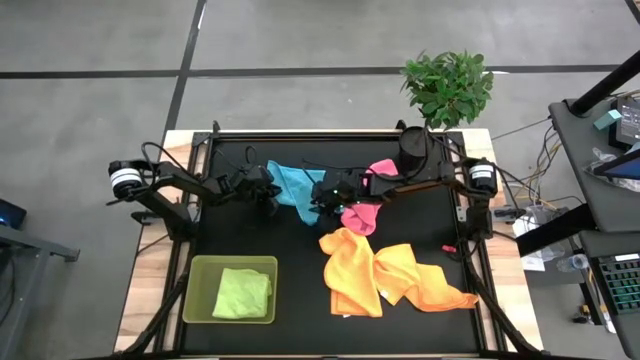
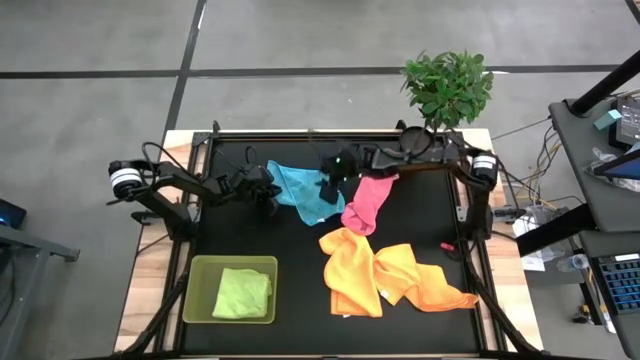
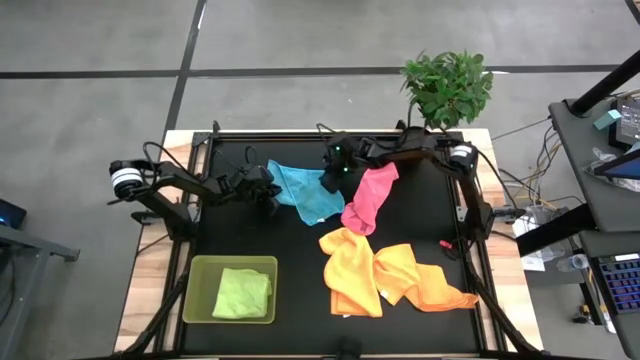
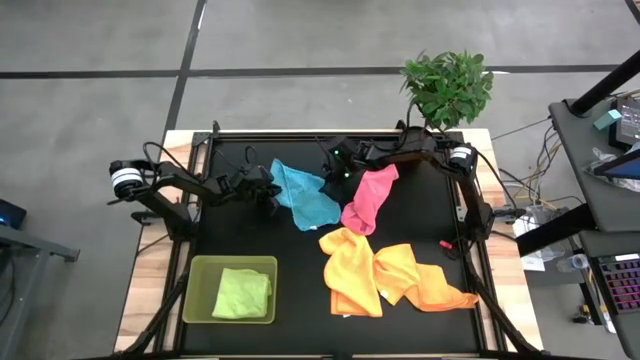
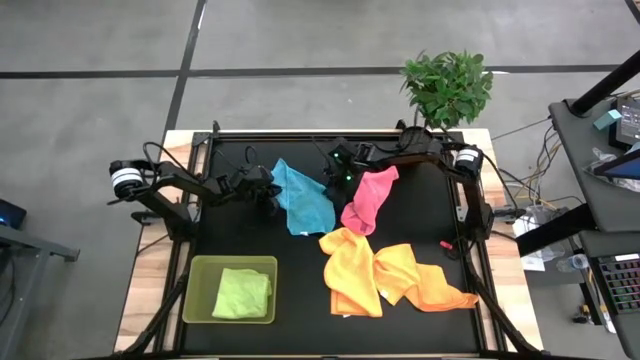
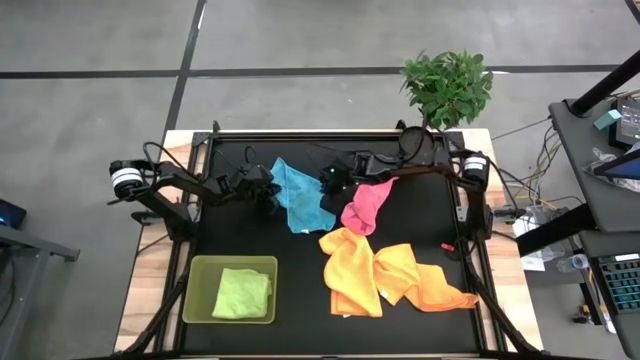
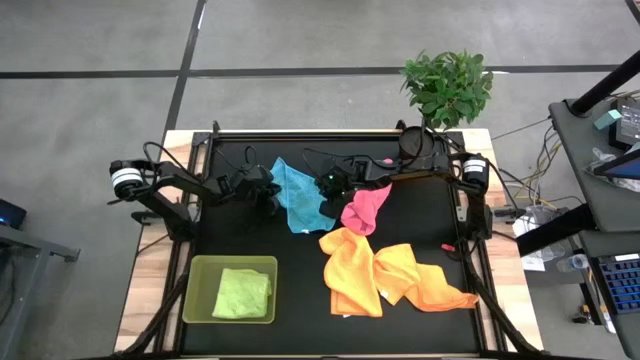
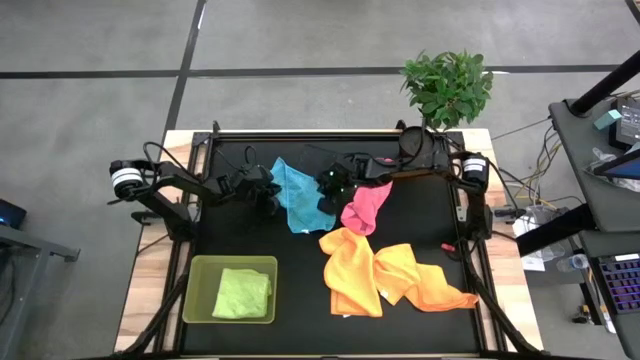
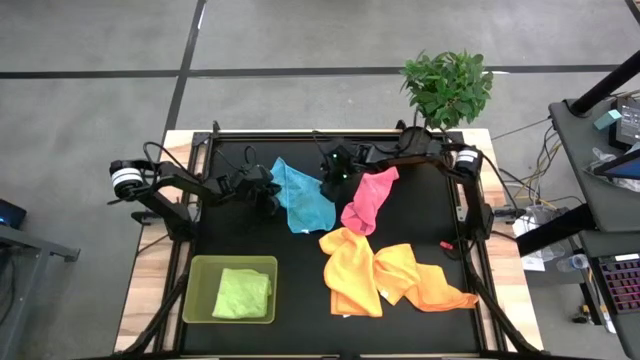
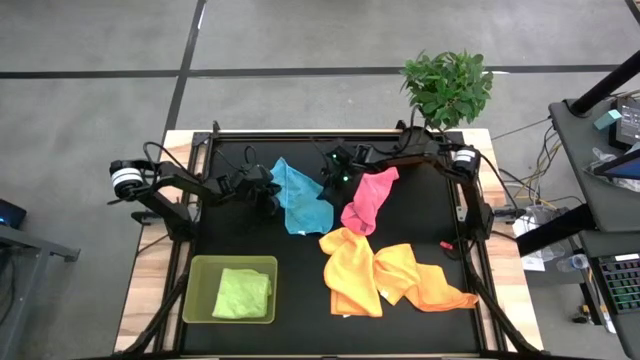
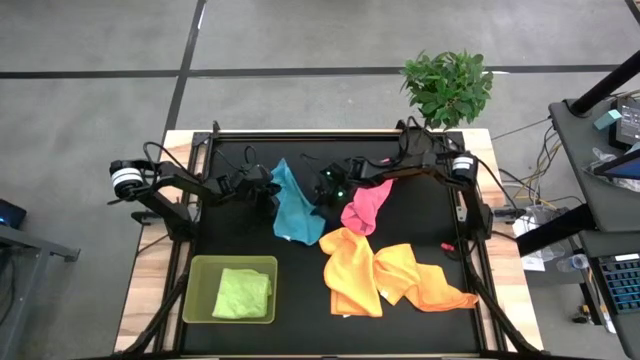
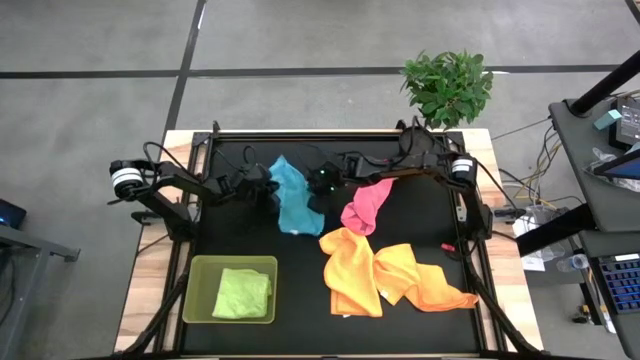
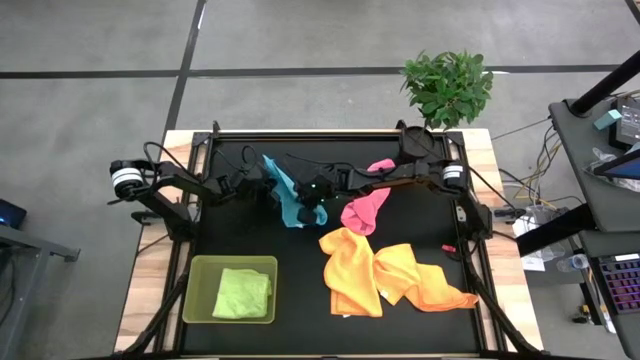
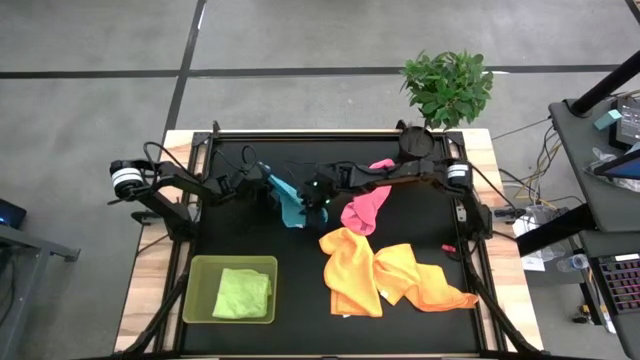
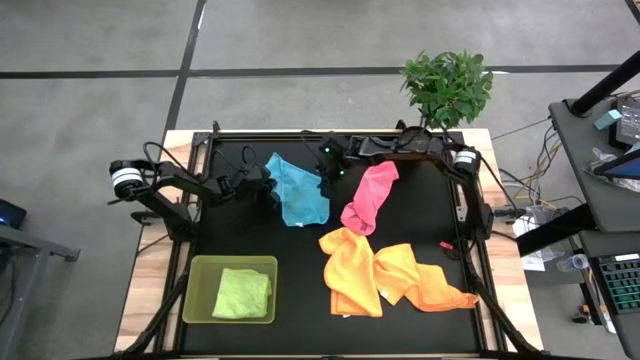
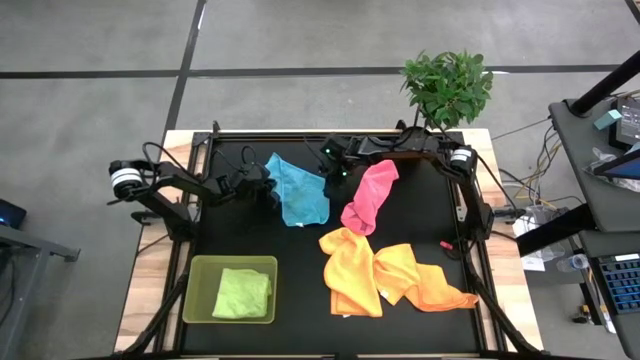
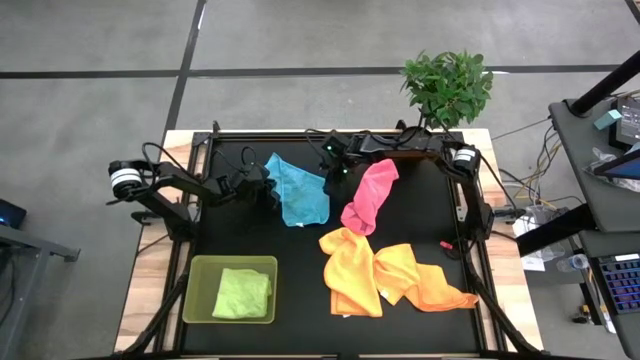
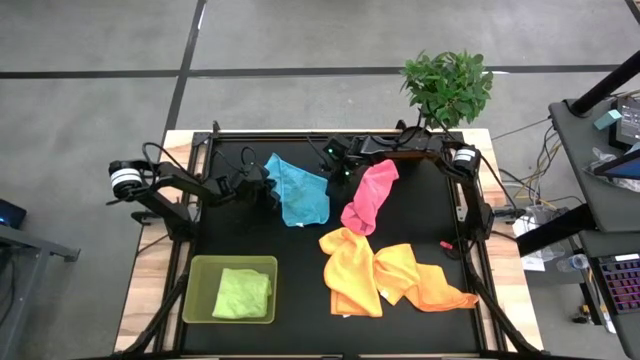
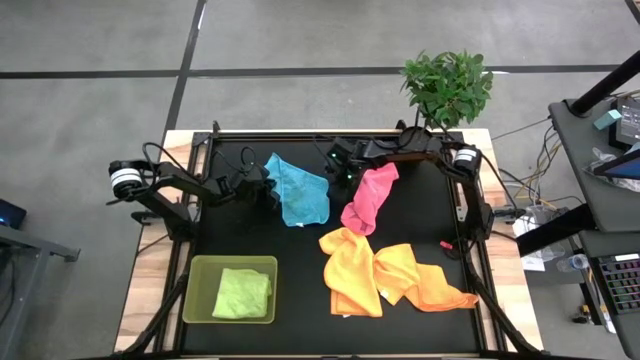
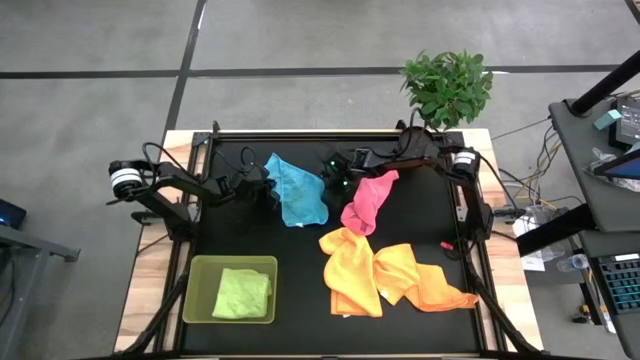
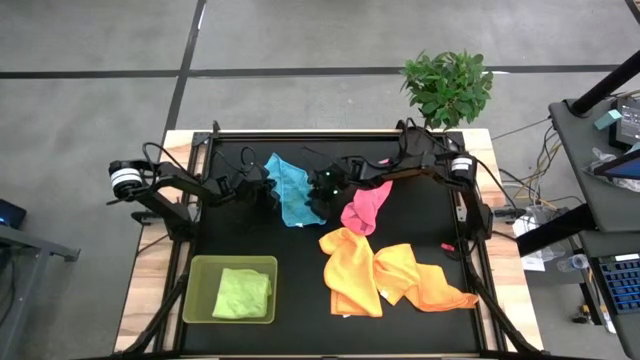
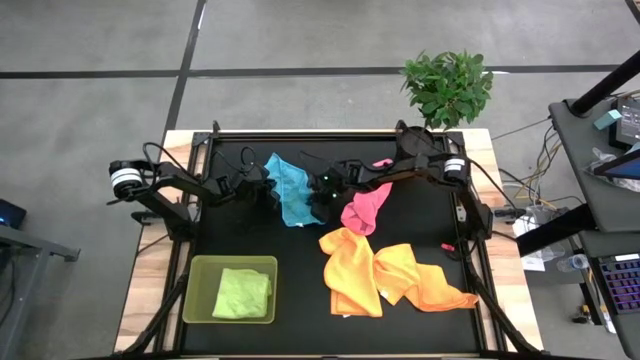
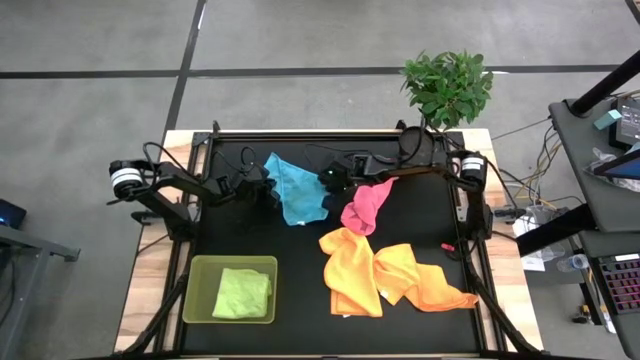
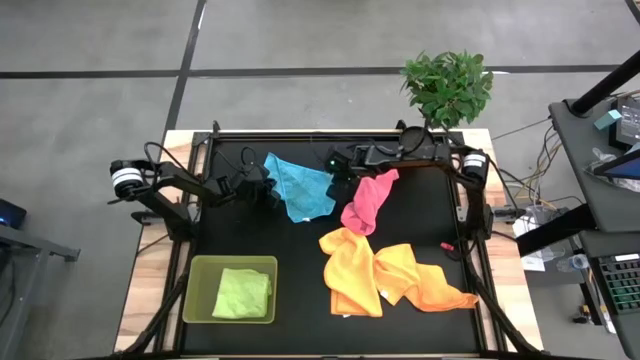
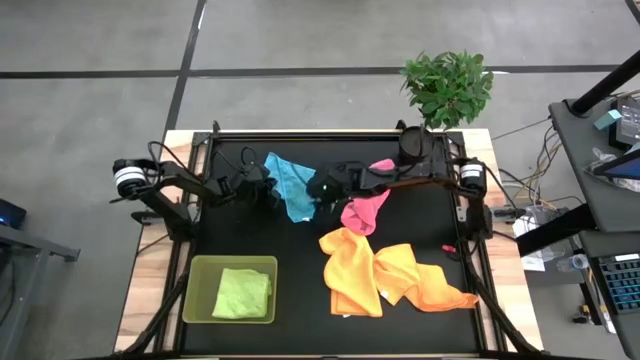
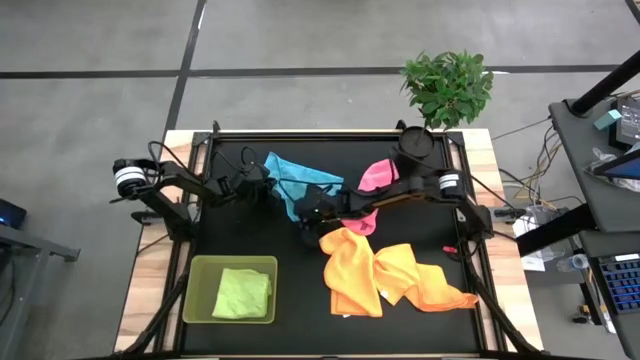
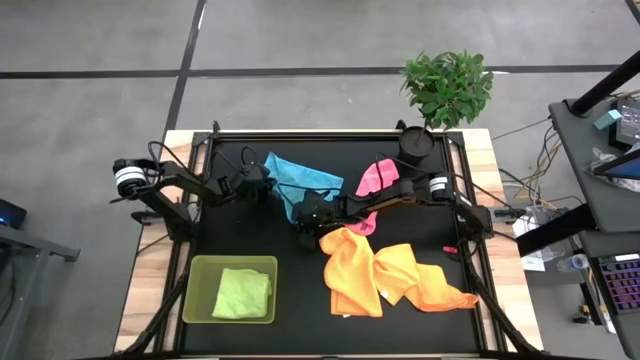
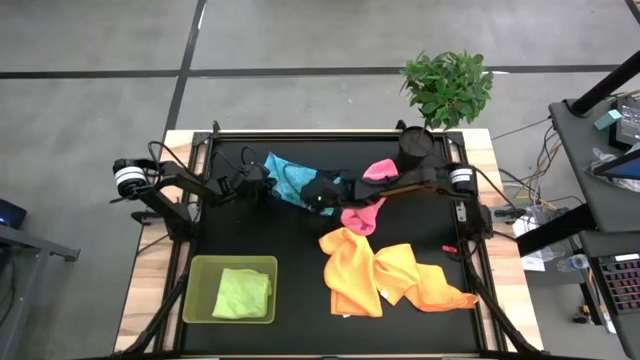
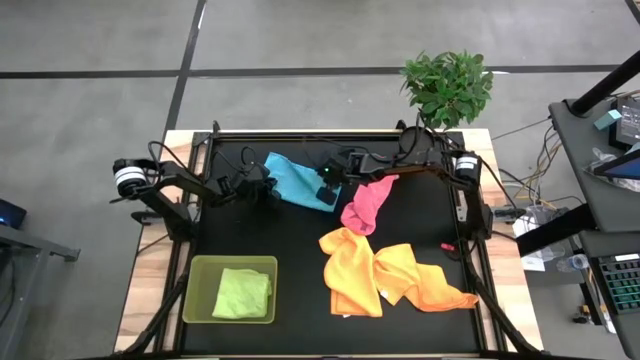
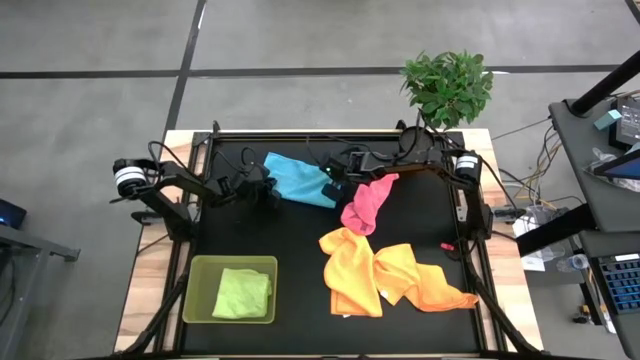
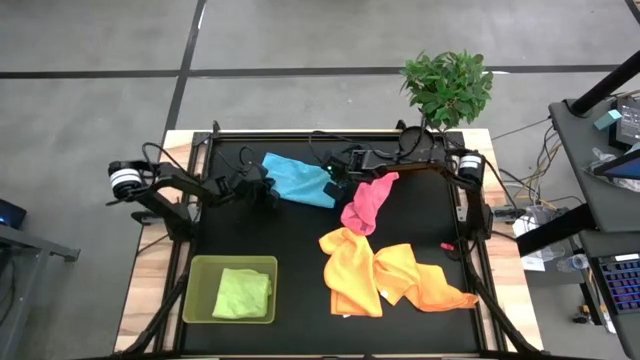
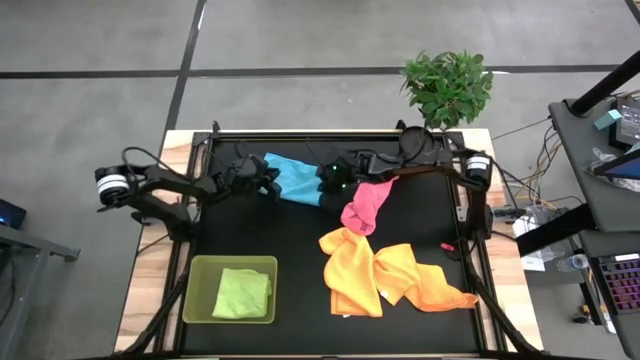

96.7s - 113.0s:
Task: Fold microfiber towels
Fold the blue microfiber towel

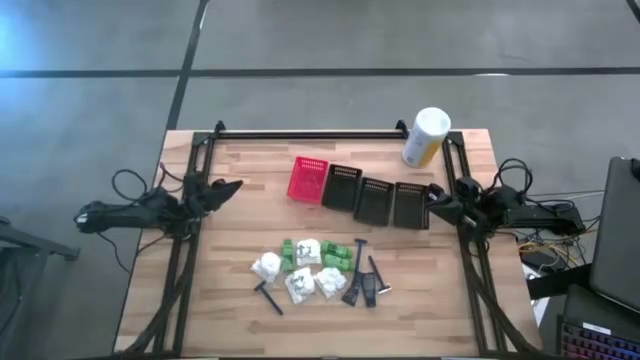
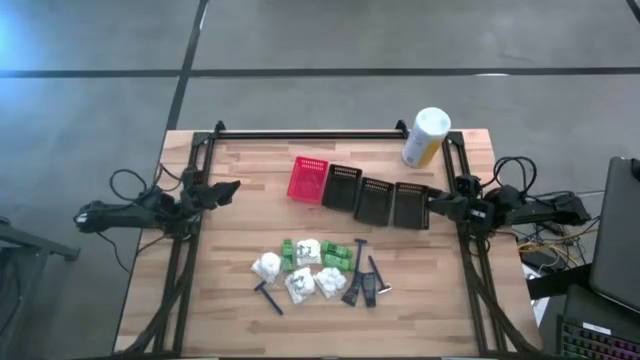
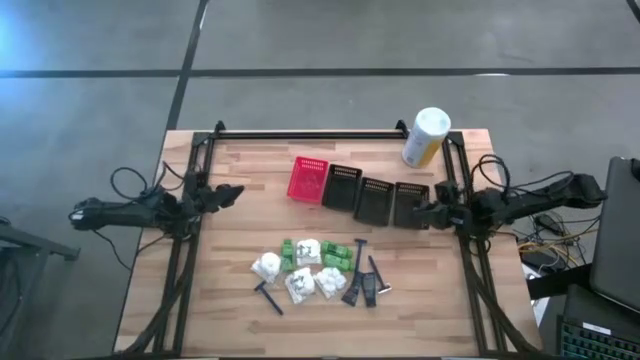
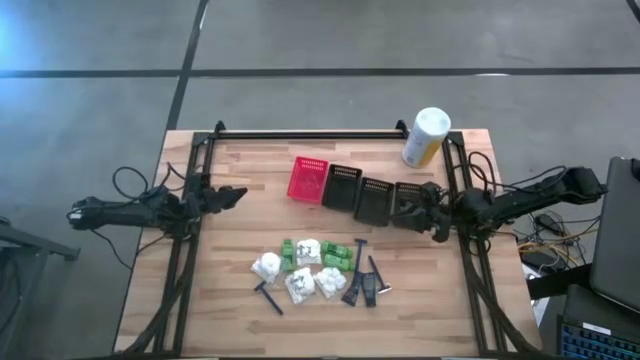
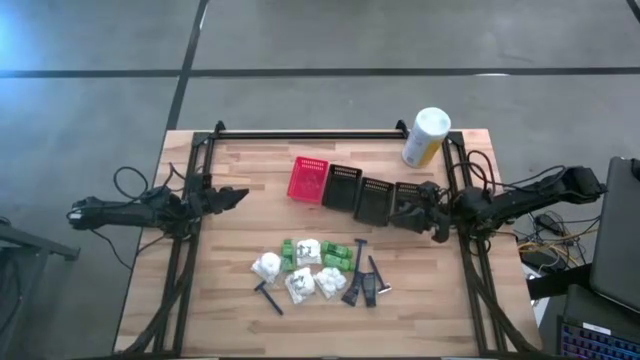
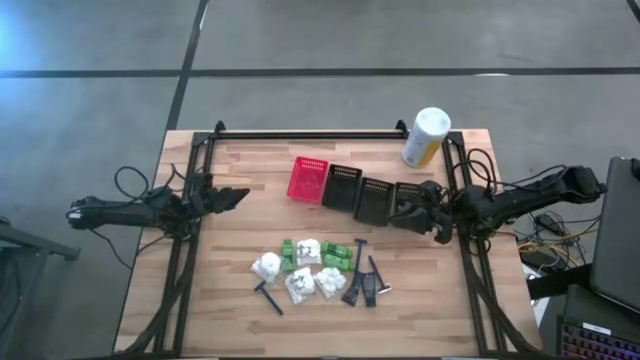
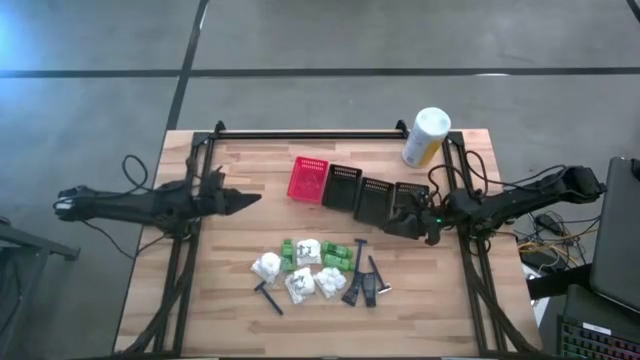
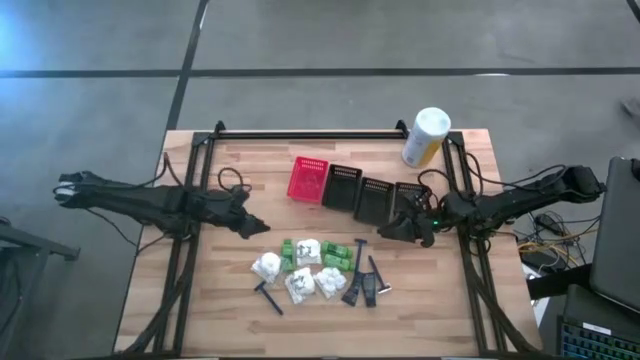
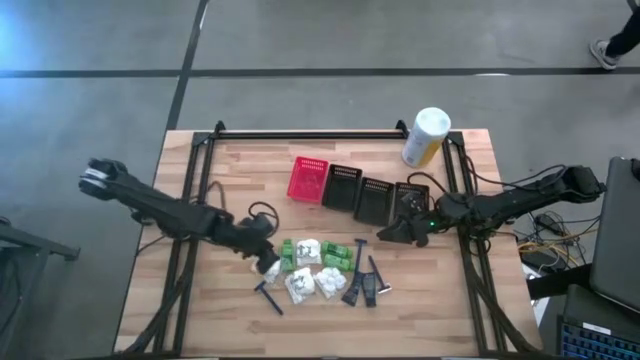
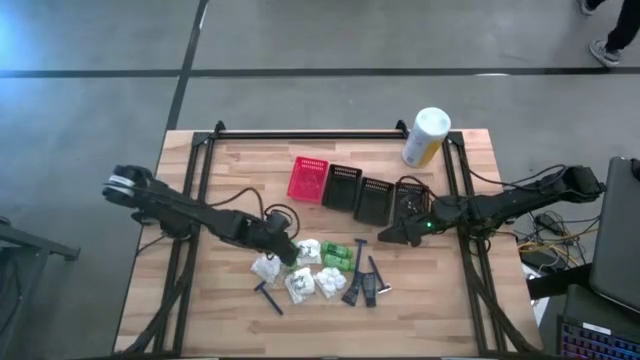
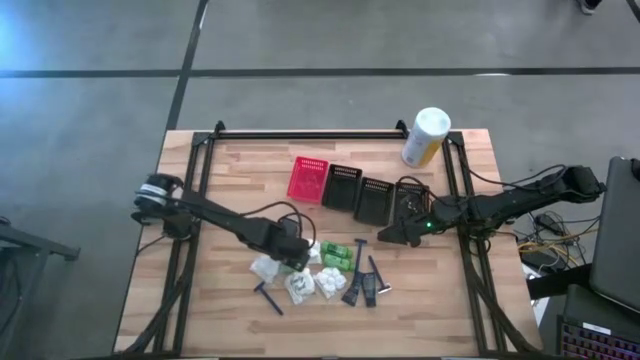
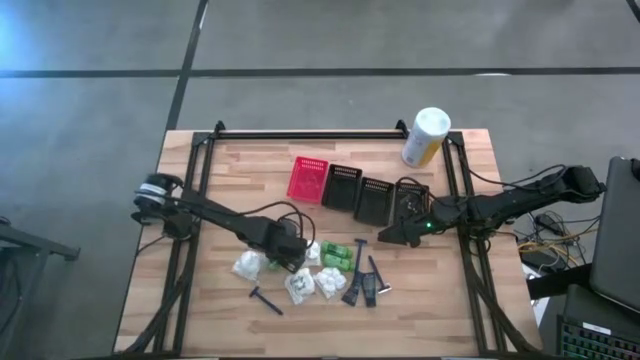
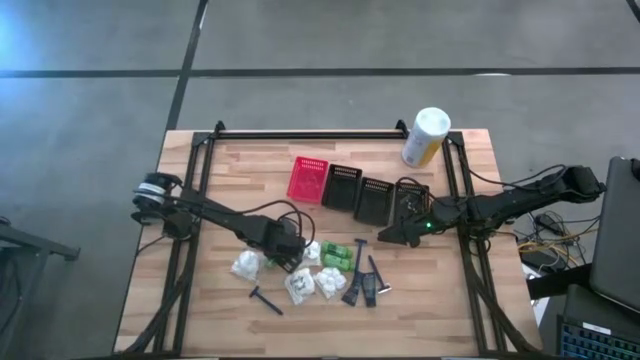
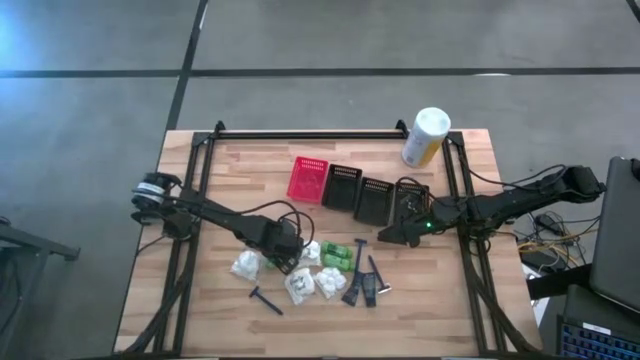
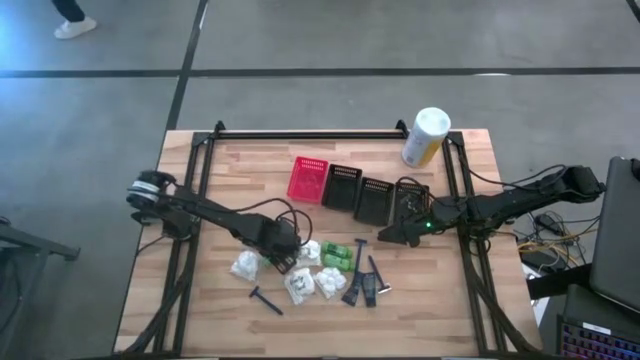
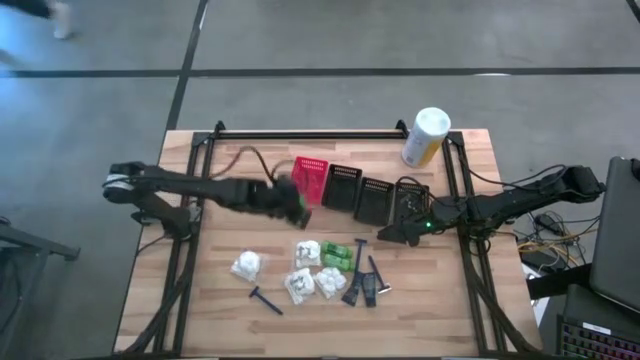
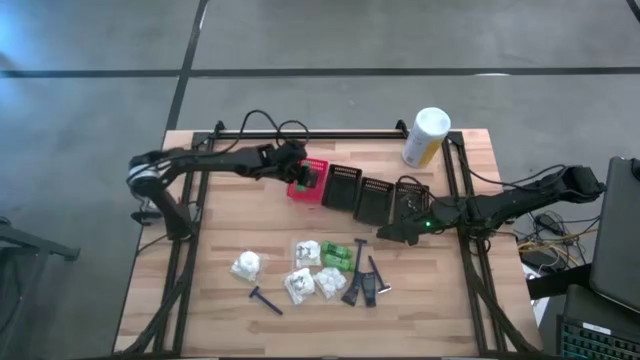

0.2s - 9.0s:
Task: Pick & Place Travel size toiletries
Put the shampoo into the red bin
